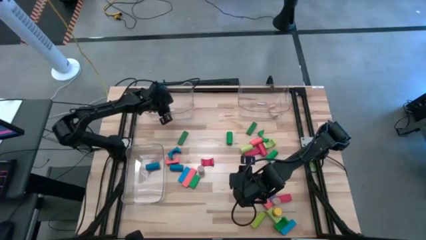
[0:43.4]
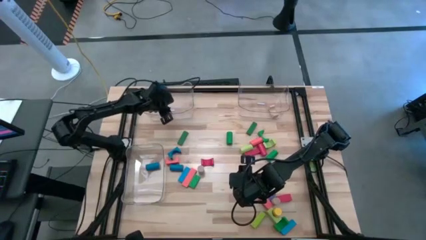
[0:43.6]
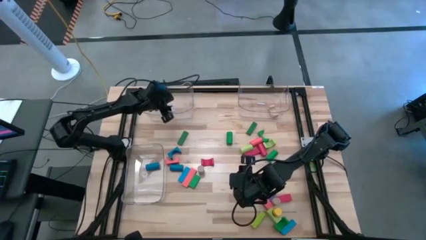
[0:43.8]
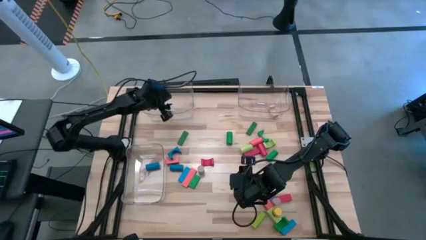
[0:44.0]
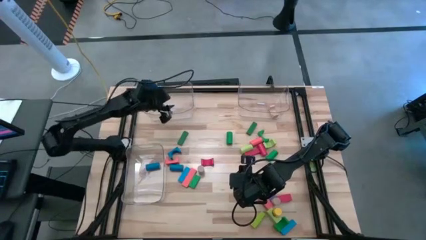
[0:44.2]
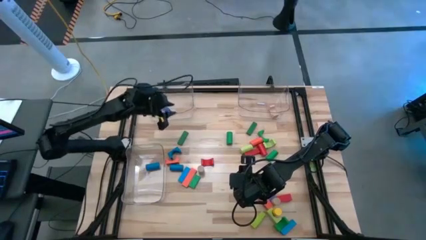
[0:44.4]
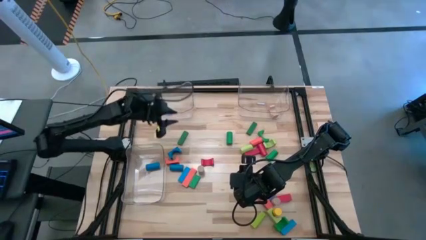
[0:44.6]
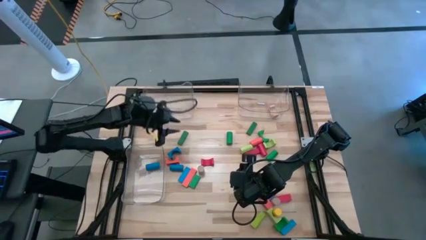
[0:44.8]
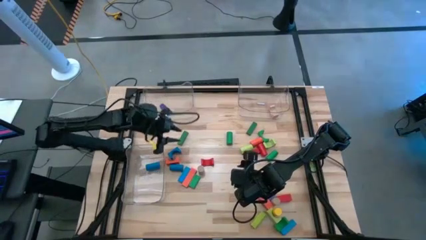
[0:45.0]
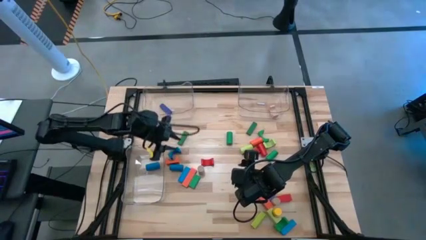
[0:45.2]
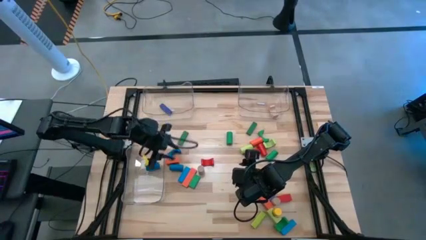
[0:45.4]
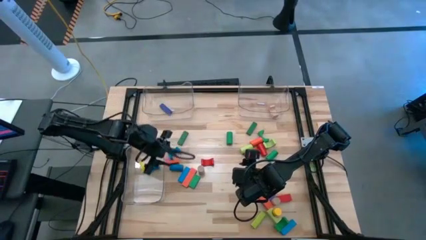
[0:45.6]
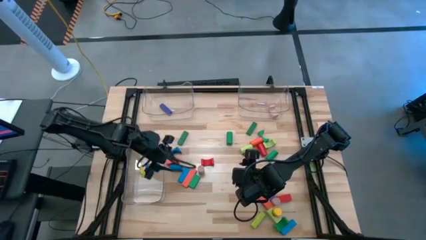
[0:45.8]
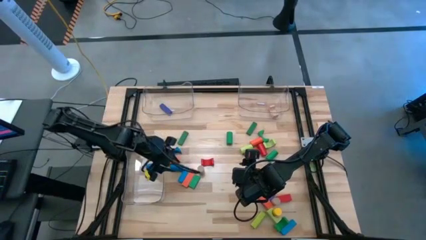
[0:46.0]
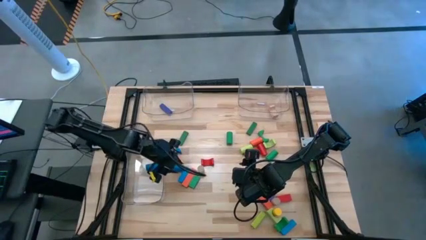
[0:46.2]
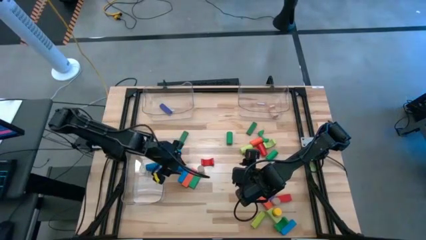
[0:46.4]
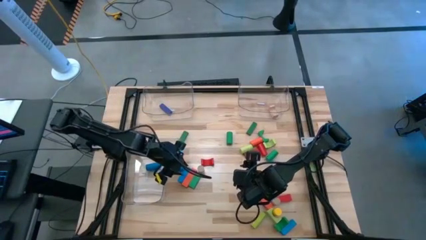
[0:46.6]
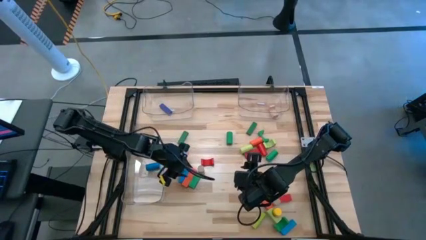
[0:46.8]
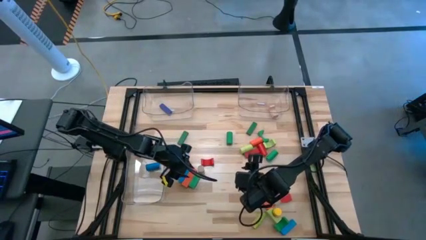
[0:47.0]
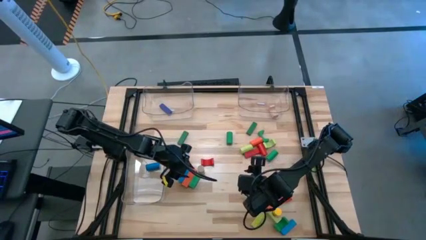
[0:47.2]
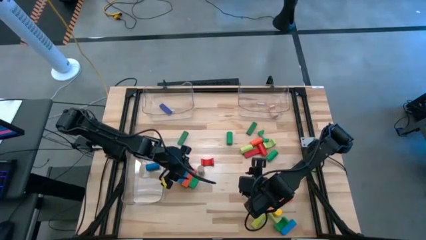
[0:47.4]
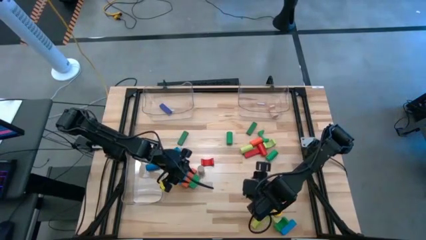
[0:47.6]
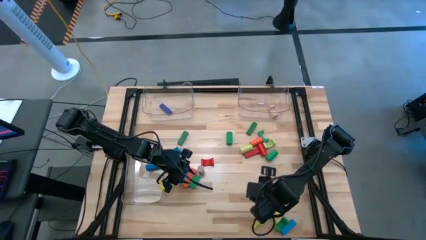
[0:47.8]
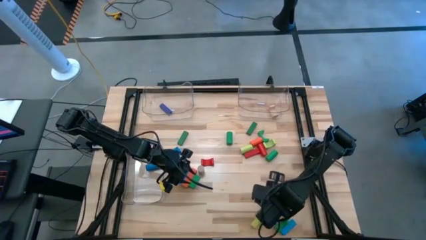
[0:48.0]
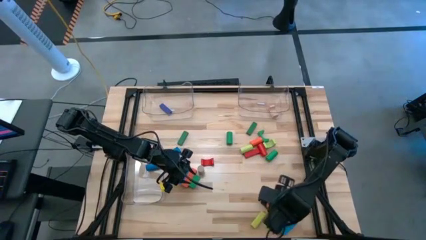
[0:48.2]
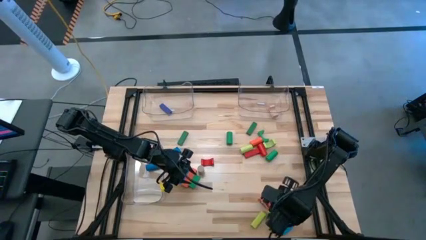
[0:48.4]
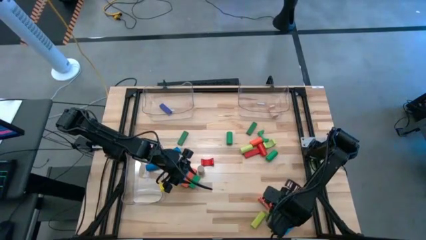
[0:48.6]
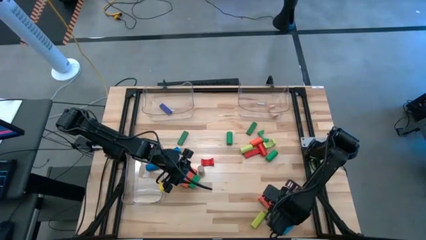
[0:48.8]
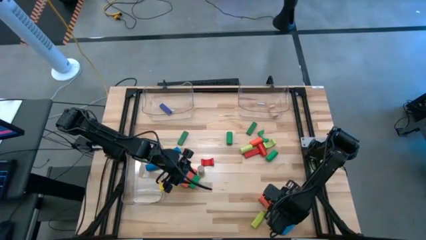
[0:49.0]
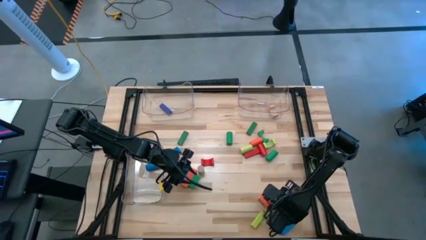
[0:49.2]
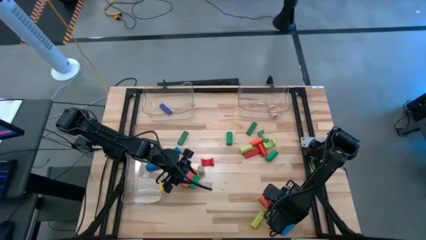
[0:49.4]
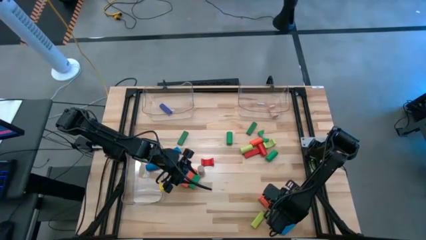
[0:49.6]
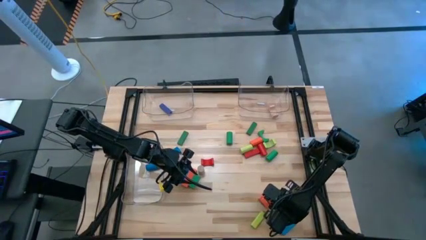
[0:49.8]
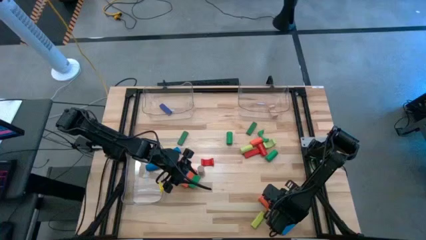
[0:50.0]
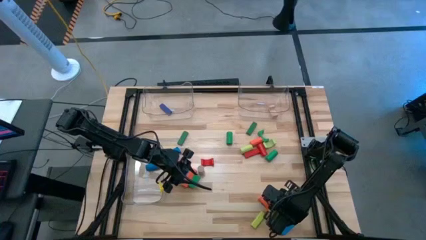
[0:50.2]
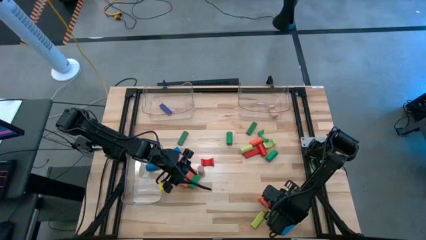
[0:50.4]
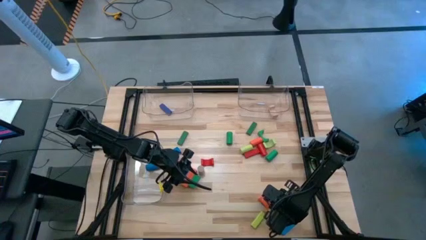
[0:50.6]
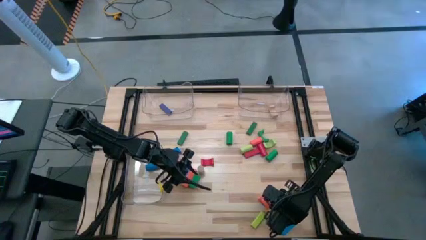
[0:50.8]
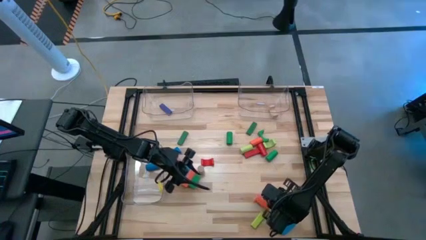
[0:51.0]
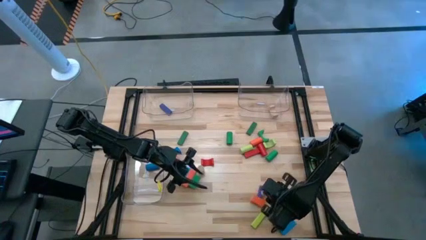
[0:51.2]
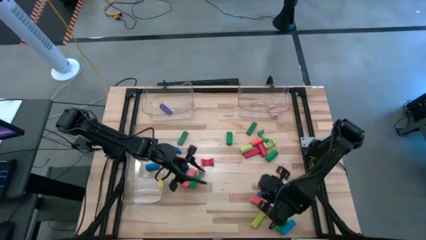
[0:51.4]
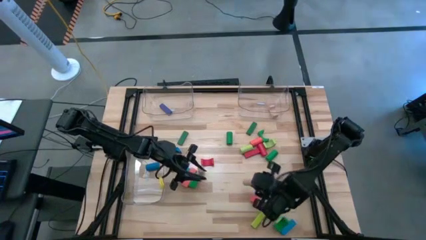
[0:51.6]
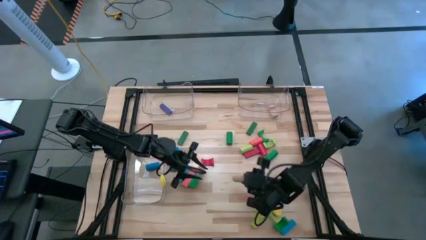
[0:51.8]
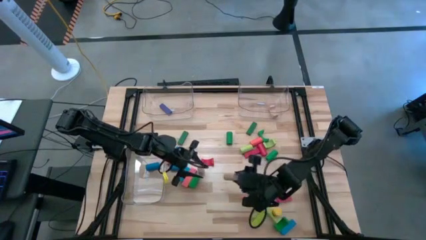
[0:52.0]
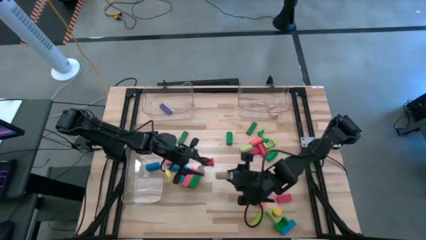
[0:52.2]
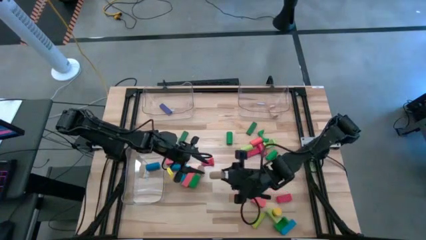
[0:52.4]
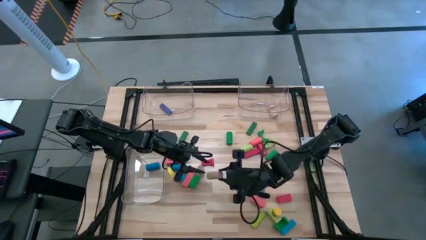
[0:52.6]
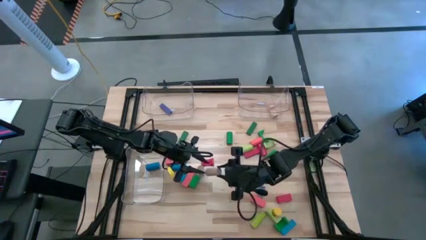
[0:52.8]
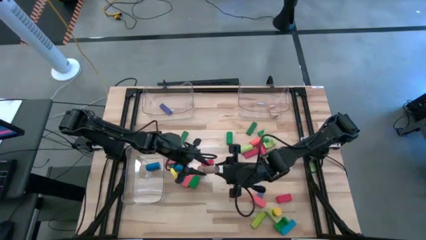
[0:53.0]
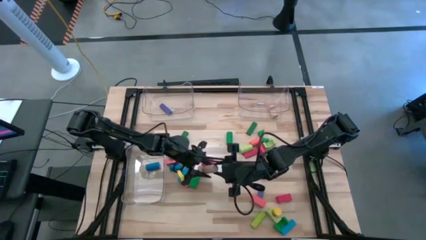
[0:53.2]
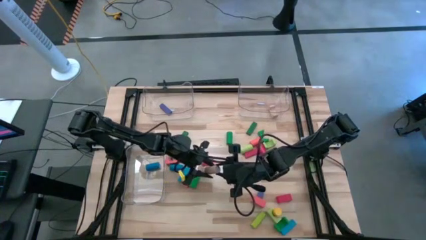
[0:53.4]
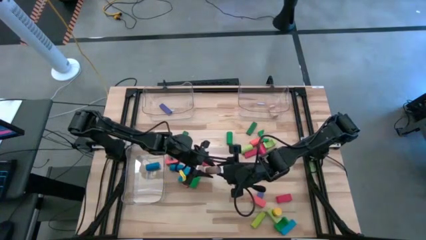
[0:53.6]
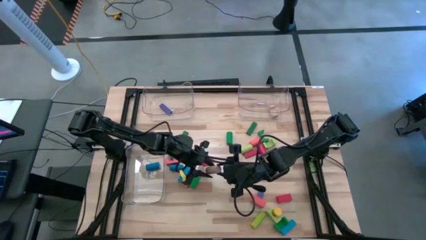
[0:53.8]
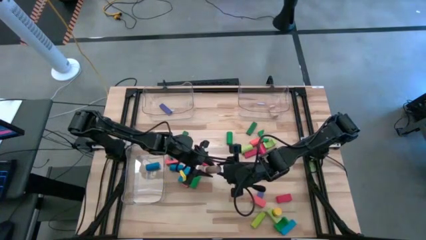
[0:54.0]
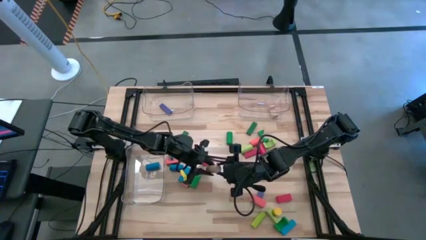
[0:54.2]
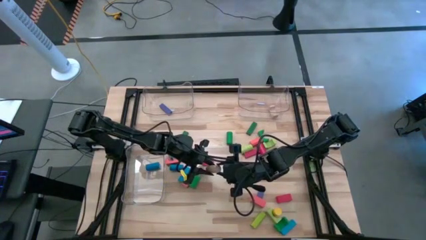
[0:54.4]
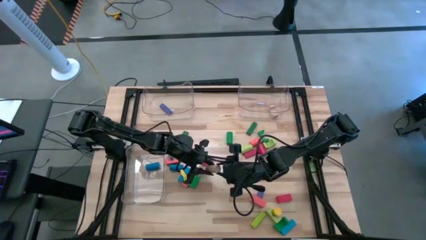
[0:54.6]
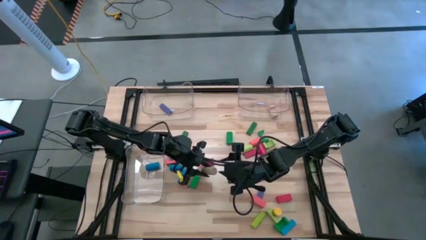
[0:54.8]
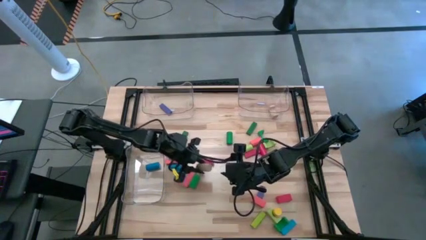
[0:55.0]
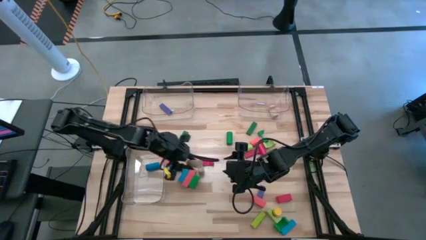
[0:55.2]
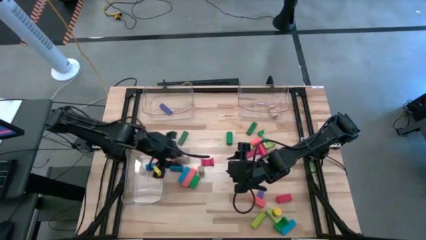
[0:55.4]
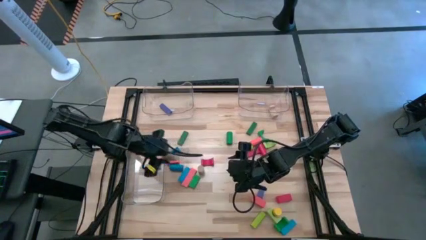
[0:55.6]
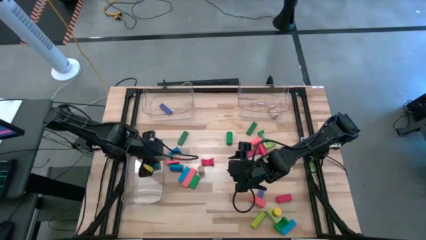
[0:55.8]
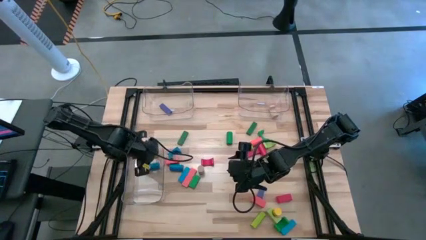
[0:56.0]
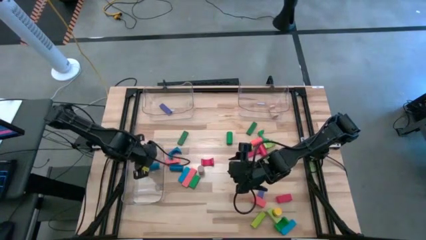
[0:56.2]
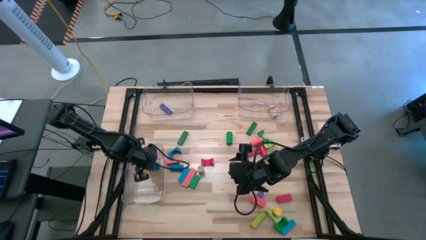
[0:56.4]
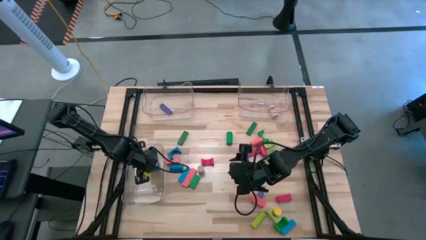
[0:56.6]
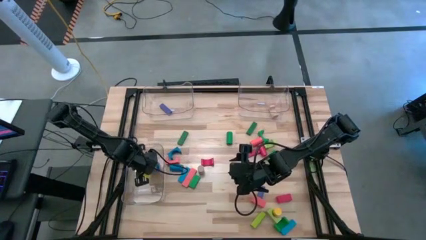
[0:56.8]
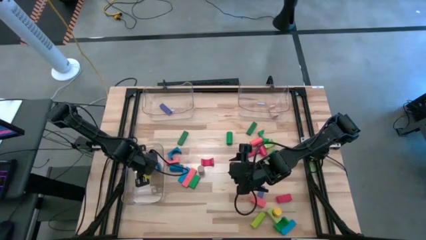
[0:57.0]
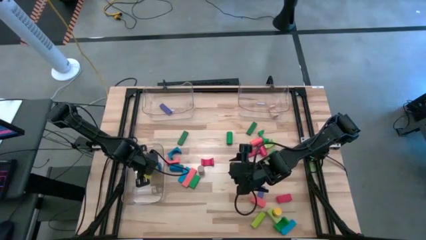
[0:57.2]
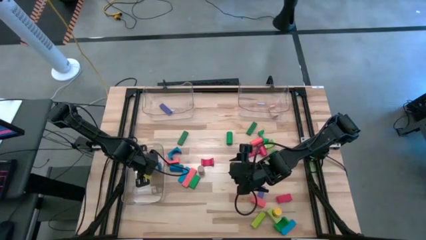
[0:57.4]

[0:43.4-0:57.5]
Task: Sort blocks by size
Put the brown cylindrical block into the bottom left transparent bin

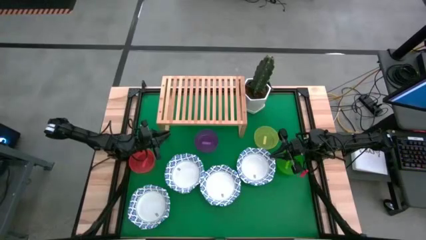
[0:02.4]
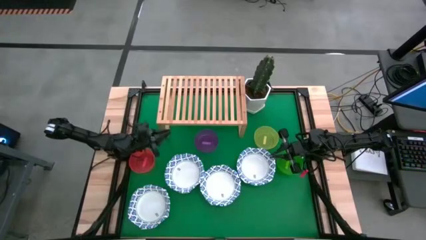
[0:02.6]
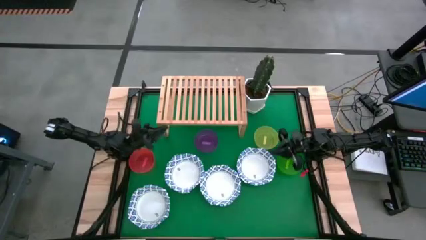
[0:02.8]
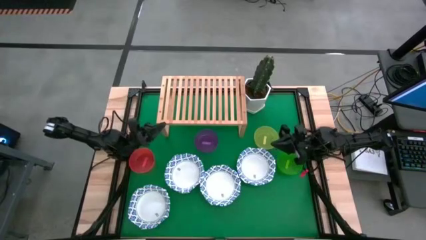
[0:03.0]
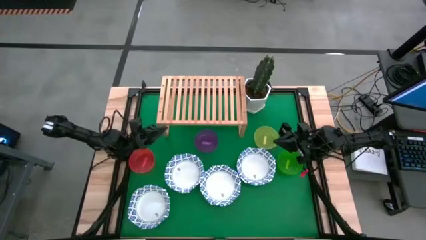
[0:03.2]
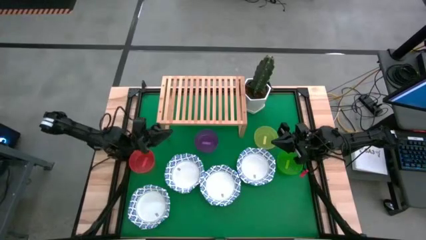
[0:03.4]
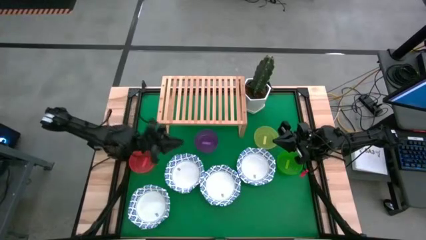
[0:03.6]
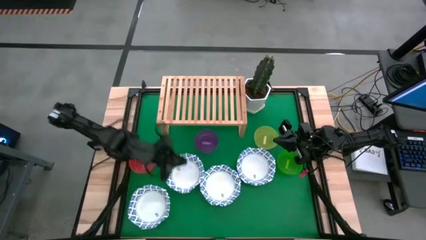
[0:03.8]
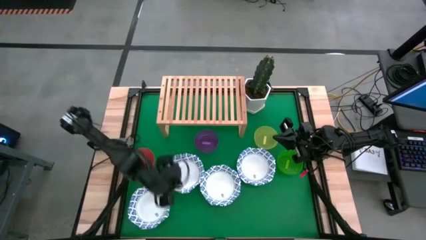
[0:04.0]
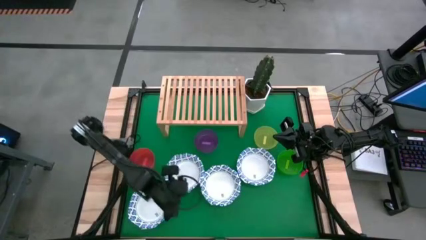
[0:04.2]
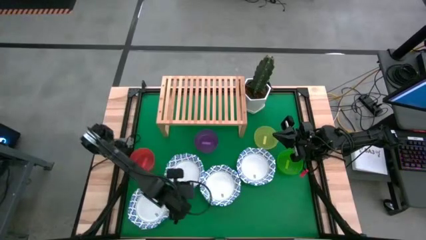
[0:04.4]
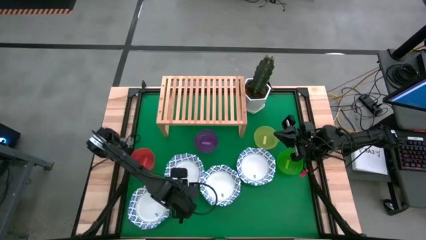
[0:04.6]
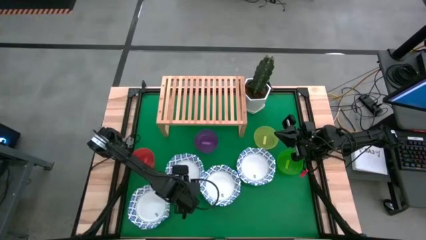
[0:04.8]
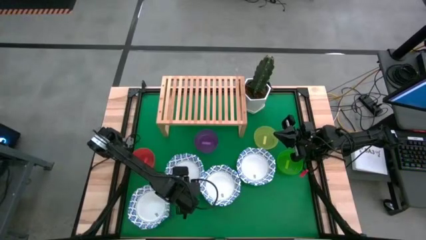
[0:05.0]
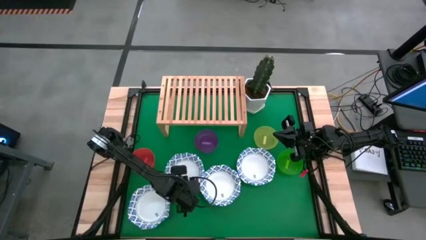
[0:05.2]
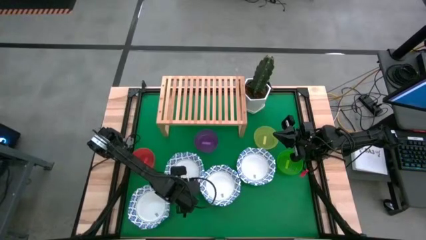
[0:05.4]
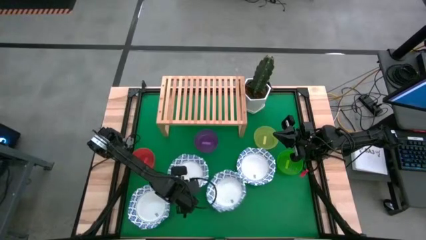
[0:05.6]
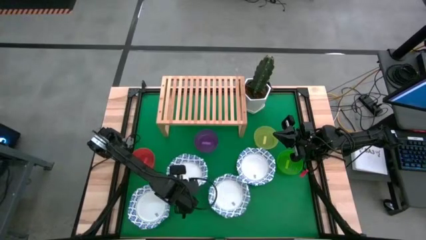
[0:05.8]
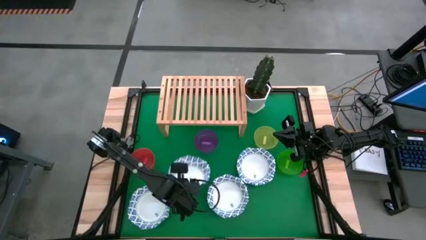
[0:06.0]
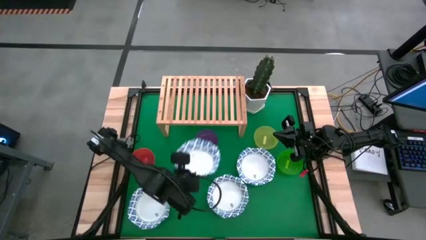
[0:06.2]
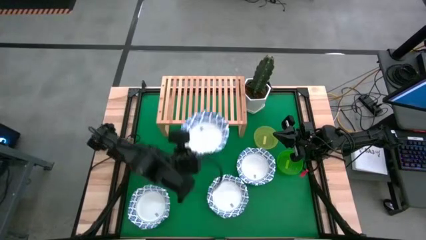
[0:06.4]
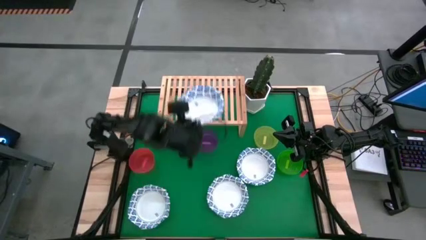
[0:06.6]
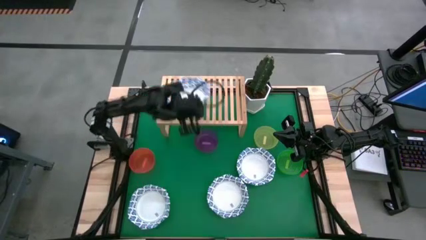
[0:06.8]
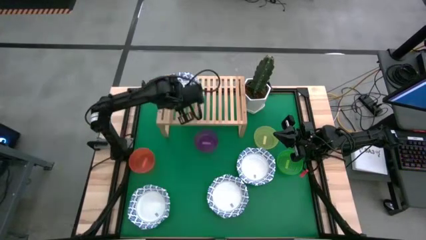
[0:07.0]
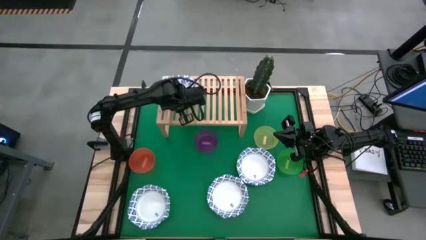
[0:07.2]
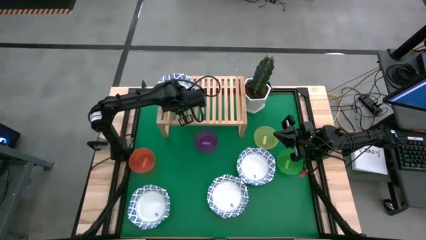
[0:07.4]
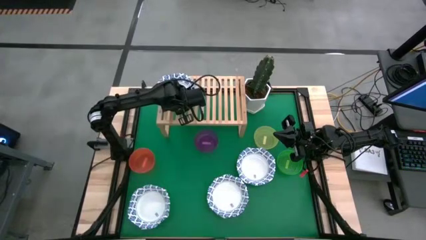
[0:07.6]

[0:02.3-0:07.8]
Task: Place and stack bowls onto a shelf
Put the blue patterned bowl on the shelf
